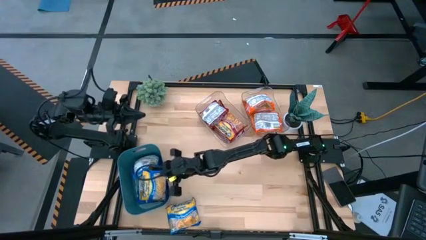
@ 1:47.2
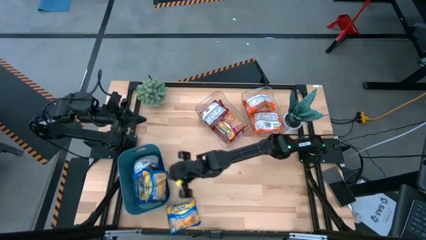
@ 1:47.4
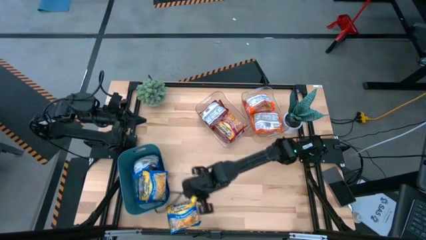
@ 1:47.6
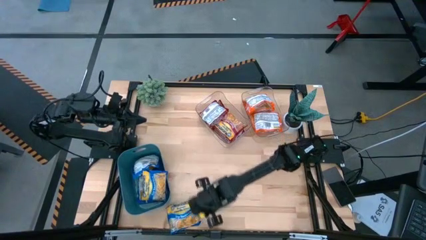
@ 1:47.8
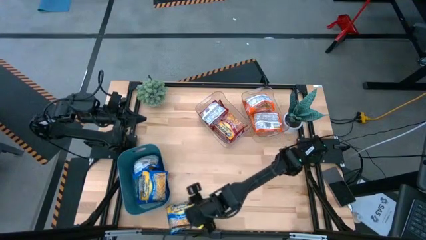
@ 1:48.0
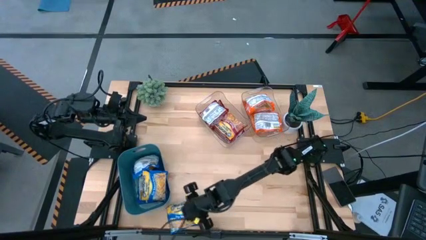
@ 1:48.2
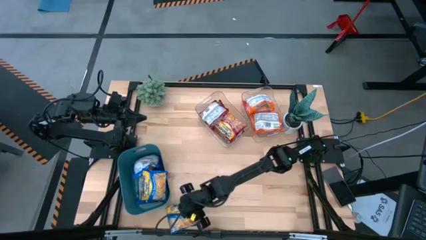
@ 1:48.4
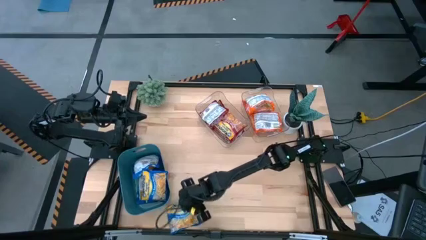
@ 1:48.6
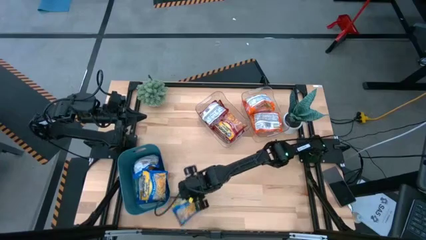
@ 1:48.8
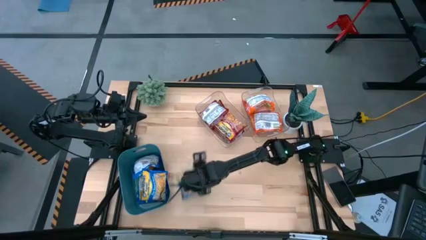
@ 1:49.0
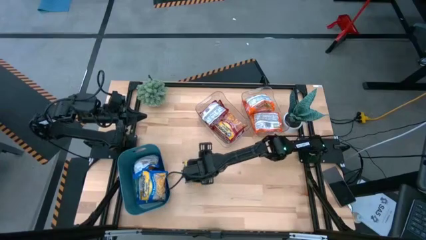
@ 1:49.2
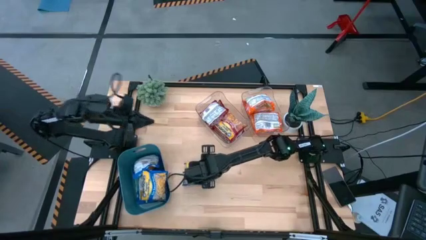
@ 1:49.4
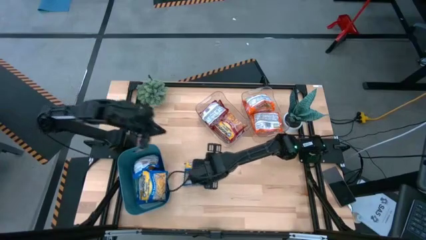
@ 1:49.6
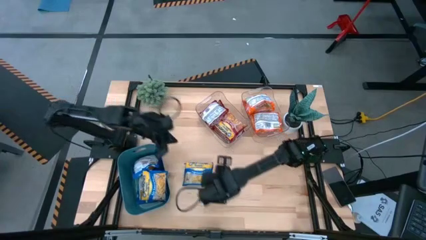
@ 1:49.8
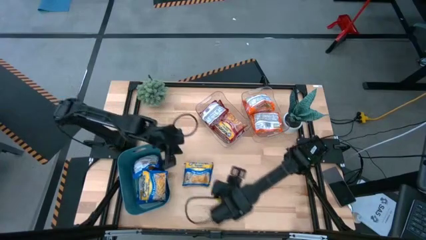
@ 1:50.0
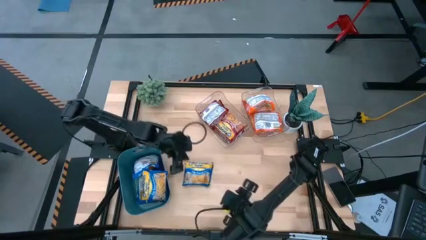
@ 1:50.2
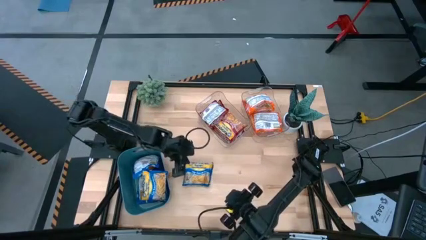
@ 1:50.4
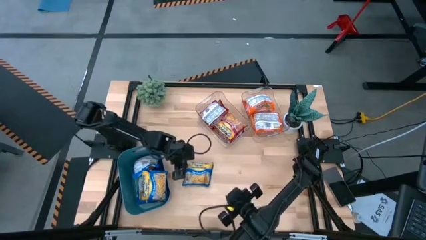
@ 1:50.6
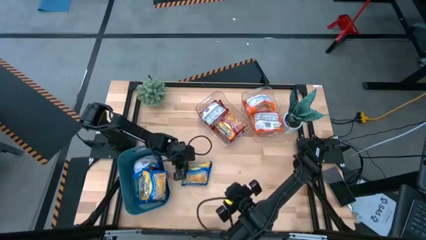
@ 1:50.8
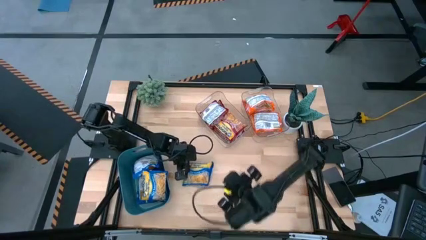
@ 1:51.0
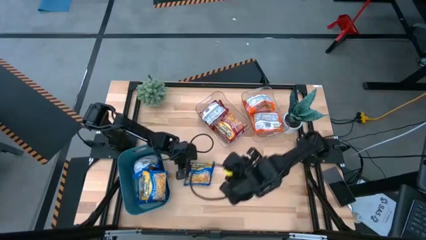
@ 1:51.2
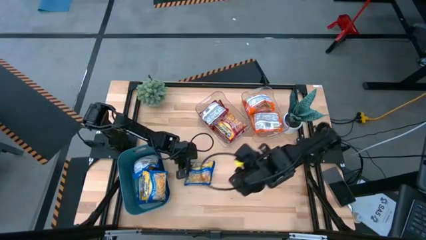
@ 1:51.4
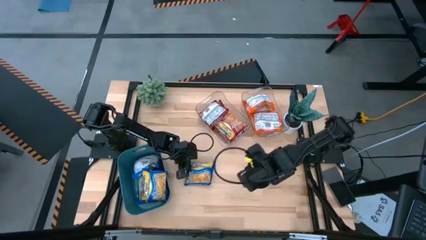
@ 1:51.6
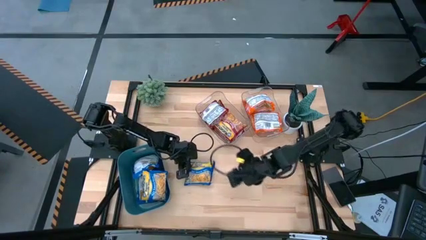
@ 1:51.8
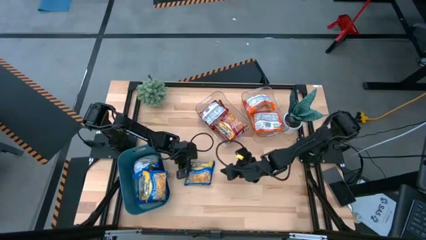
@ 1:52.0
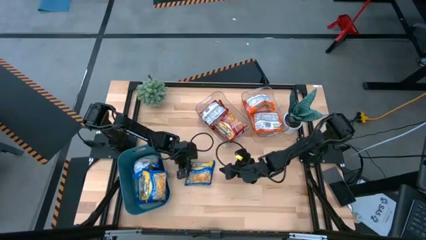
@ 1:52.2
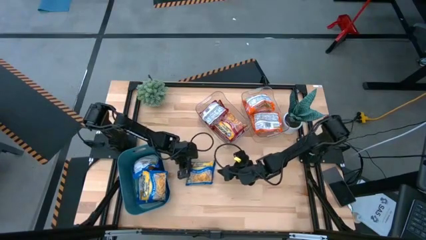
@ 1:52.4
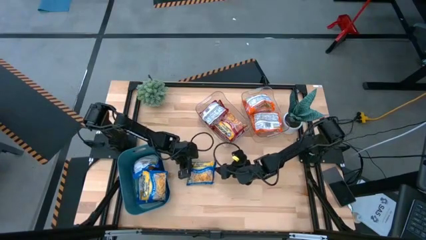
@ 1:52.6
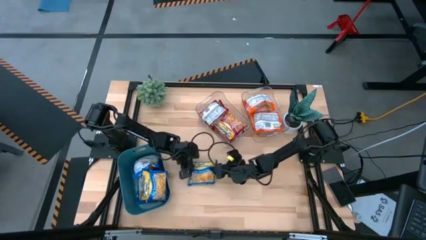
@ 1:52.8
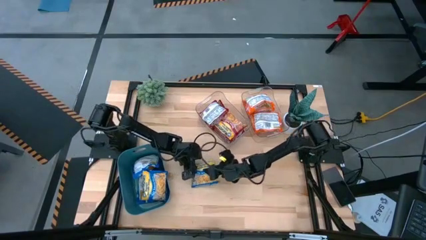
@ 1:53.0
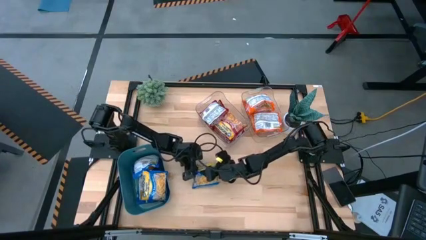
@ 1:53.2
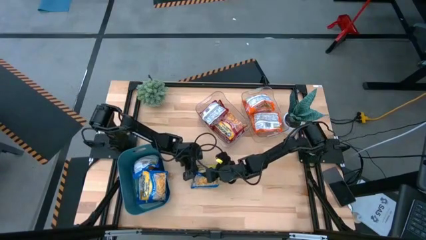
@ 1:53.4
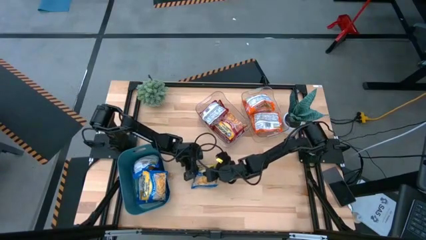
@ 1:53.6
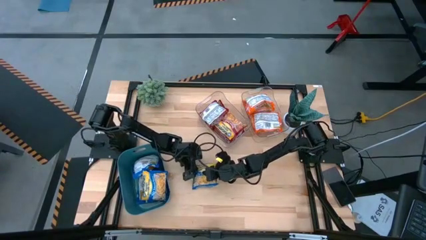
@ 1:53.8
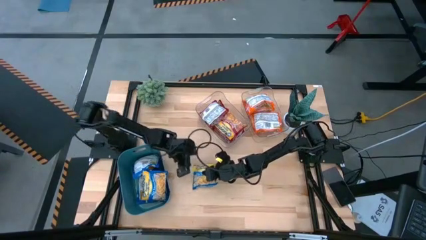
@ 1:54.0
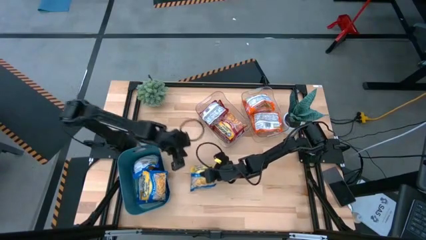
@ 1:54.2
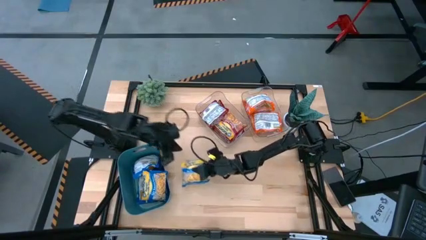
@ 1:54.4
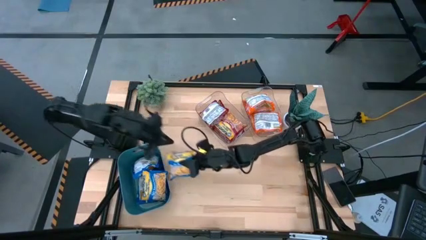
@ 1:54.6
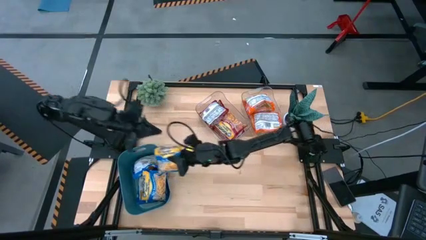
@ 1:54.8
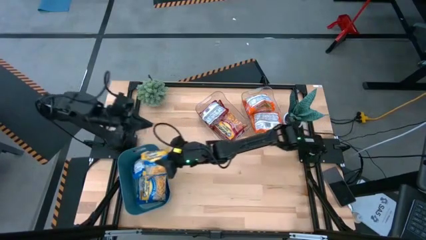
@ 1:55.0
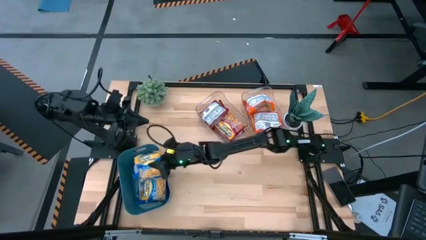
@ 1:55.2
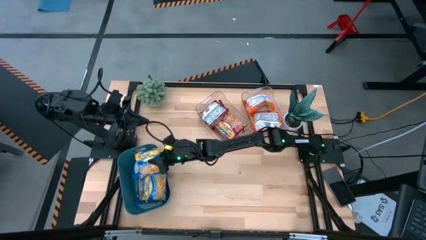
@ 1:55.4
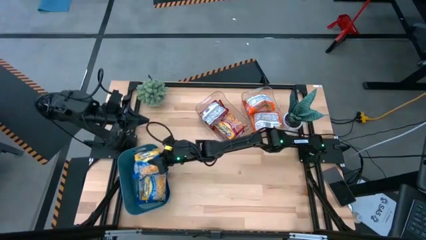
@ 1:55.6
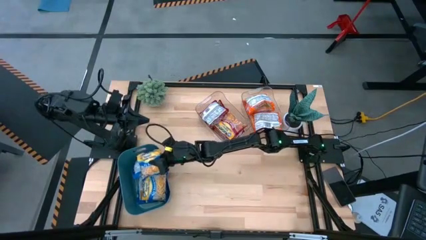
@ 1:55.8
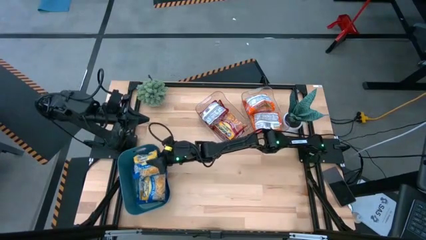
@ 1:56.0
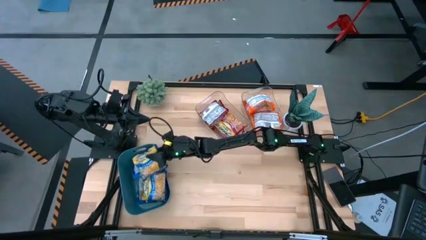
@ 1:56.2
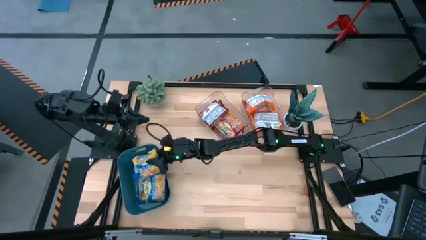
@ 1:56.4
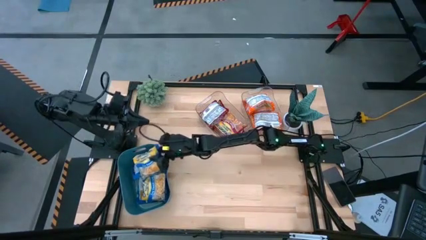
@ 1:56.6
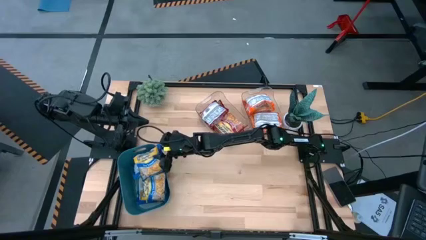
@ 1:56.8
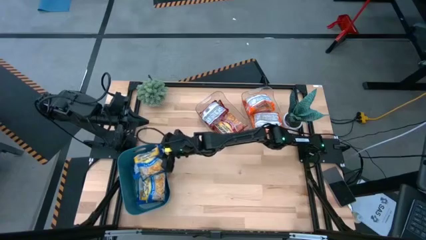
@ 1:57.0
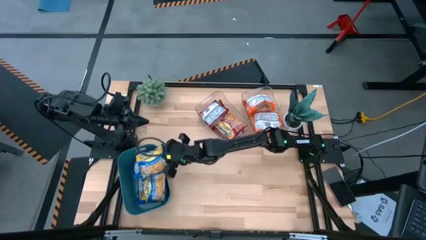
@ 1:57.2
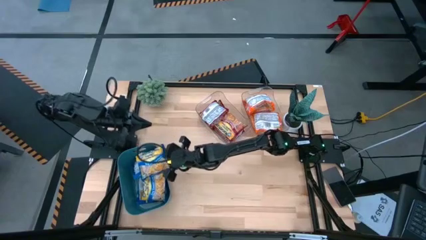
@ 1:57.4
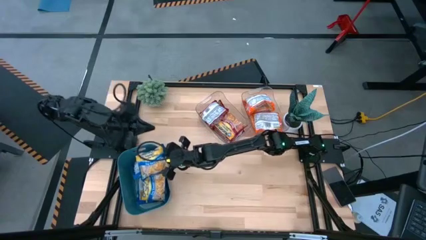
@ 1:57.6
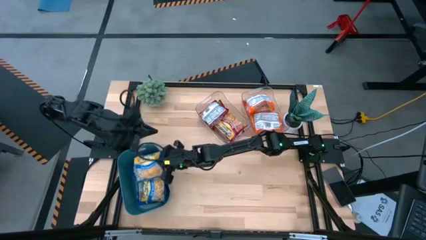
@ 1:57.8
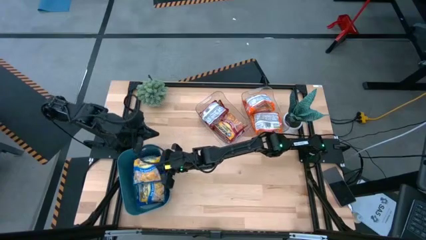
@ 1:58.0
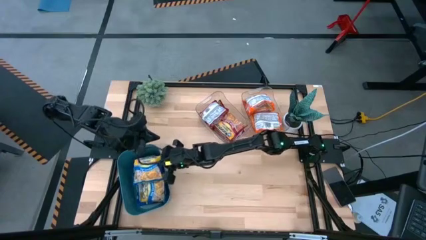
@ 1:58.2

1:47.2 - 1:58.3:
Task: Sort Maruchan noodles
Put the blue noodle pack into the blue bin

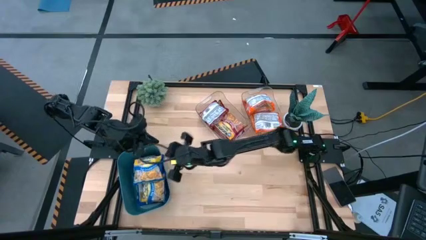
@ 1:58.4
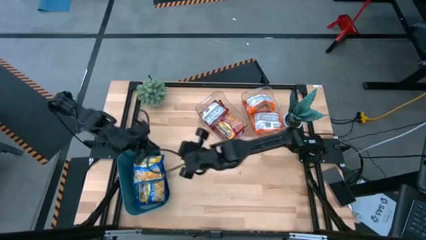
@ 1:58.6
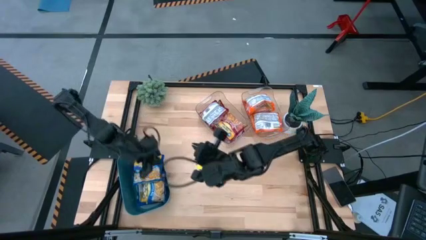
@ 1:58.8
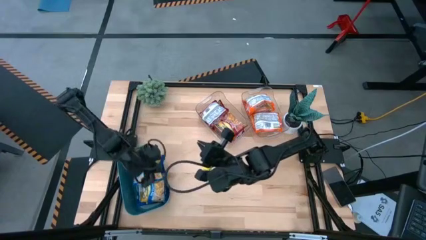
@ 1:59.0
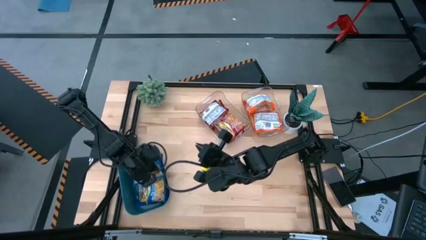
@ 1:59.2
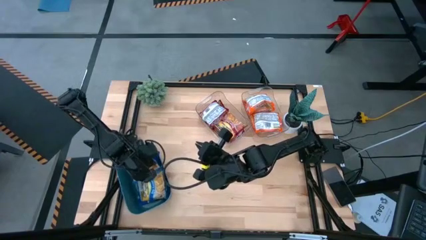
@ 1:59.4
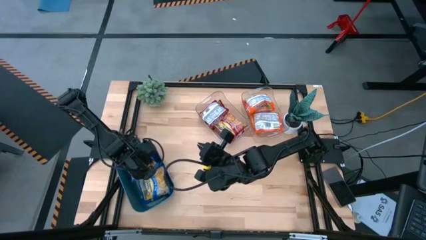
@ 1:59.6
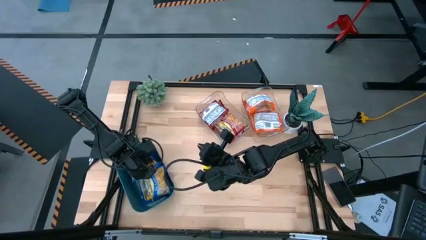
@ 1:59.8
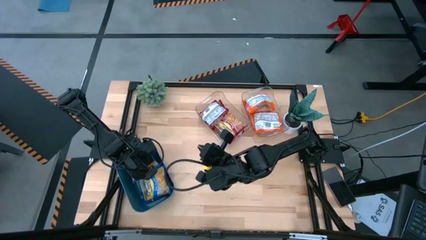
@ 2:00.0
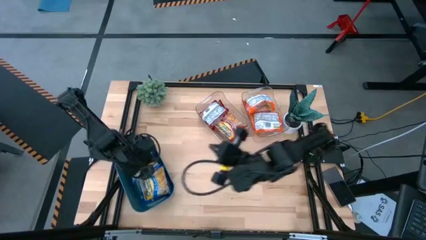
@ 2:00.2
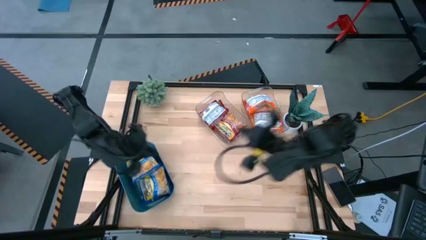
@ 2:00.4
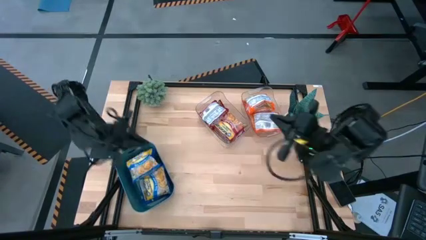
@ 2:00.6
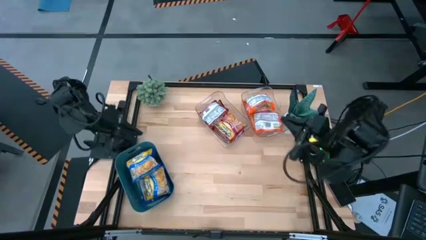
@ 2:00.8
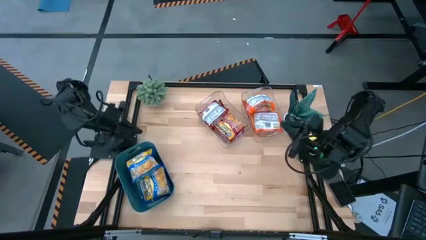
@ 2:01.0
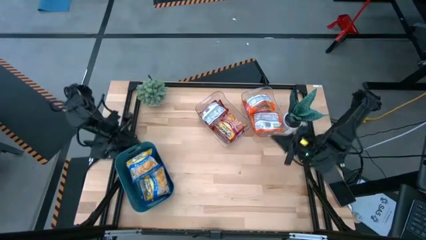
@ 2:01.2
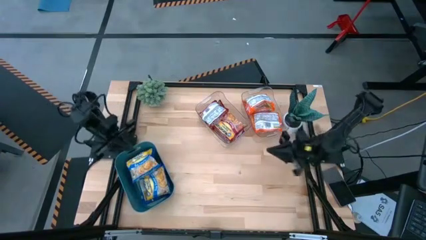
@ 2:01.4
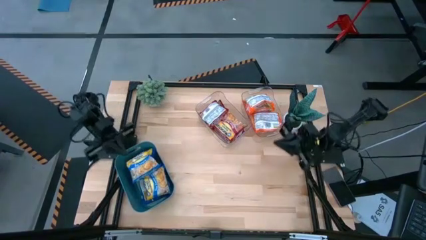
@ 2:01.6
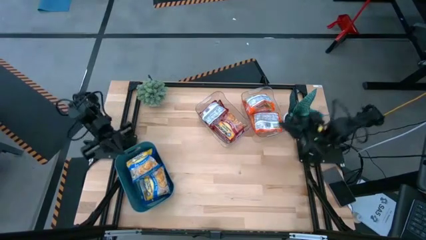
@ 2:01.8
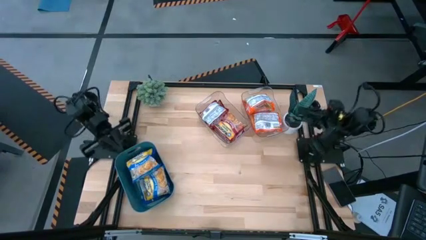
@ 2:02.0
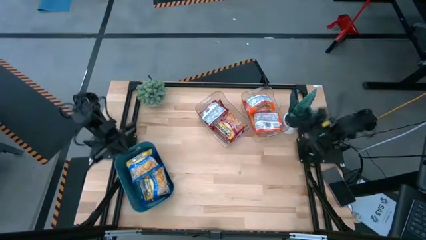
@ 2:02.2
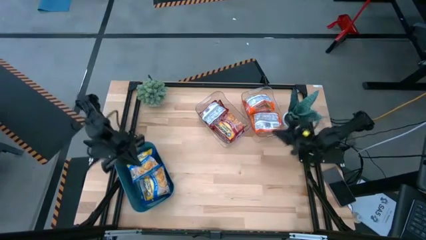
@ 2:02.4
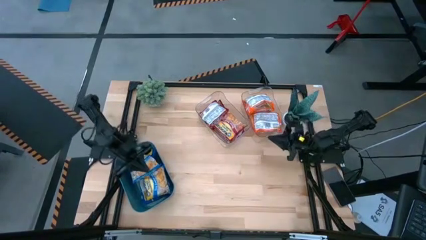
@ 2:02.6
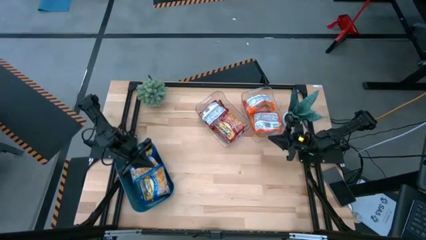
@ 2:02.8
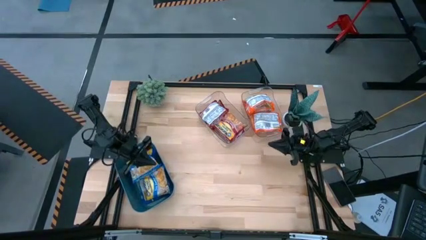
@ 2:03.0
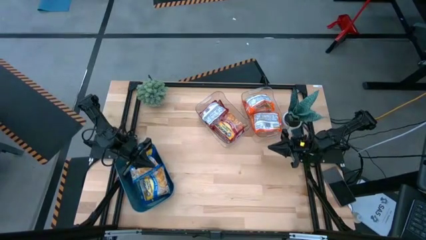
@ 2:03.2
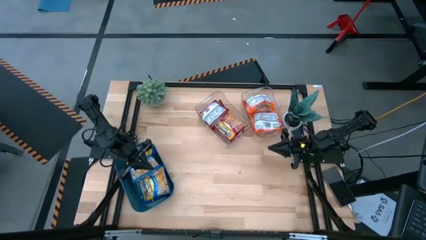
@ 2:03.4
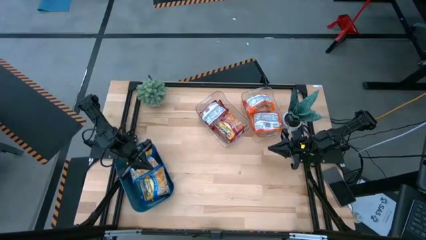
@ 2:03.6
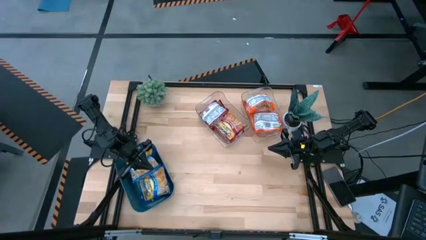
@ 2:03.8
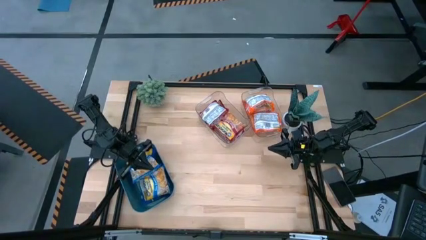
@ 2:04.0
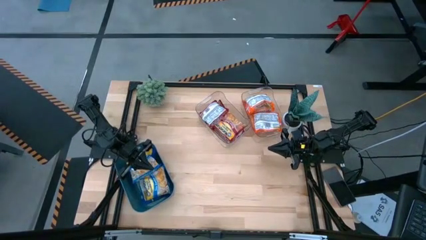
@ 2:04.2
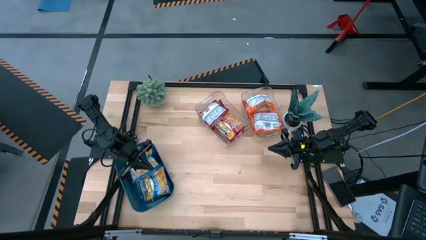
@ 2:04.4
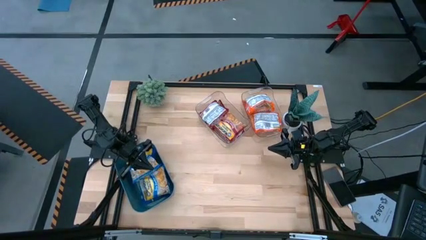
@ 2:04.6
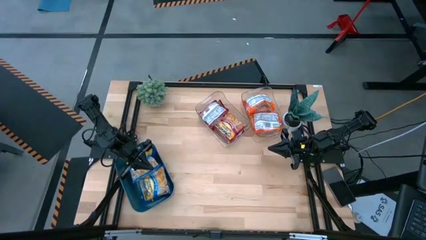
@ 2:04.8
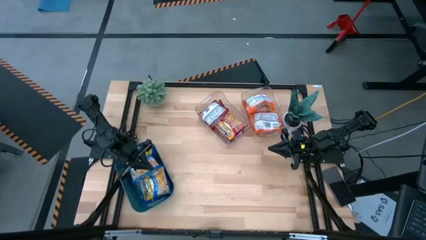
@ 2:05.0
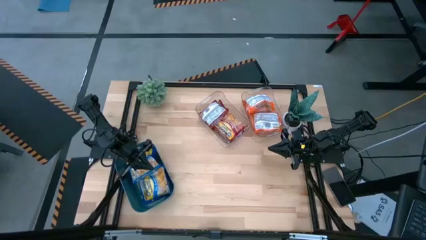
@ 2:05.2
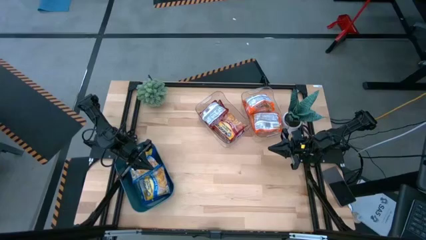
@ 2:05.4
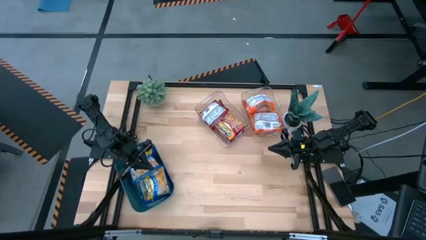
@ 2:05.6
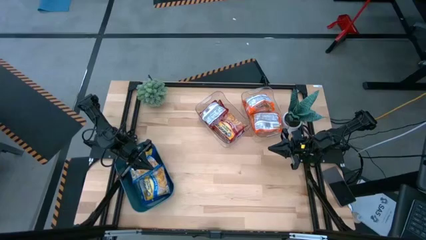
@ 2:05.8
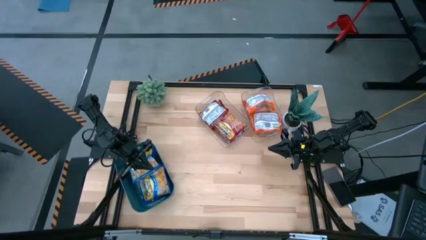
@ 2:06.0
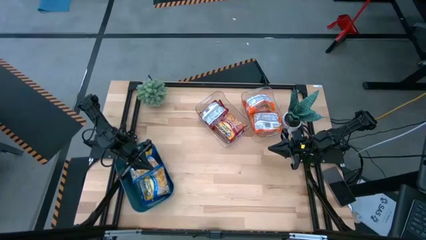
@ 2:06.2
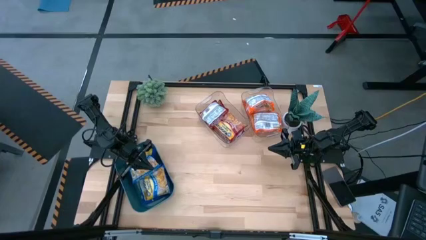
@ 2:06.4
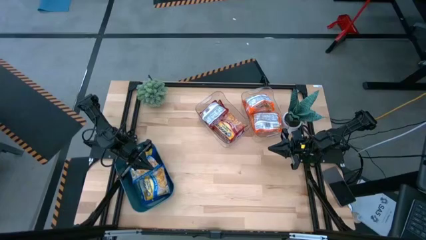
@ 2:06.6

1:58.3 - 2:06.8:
Return to Home Position
